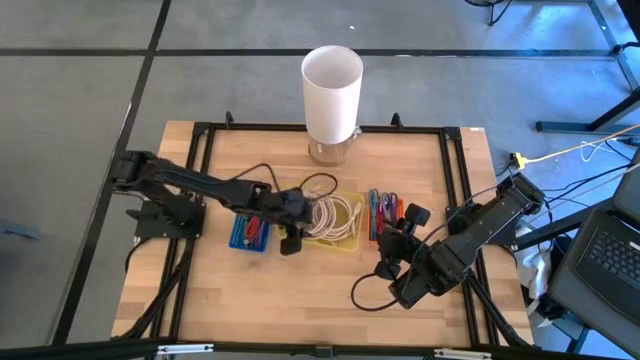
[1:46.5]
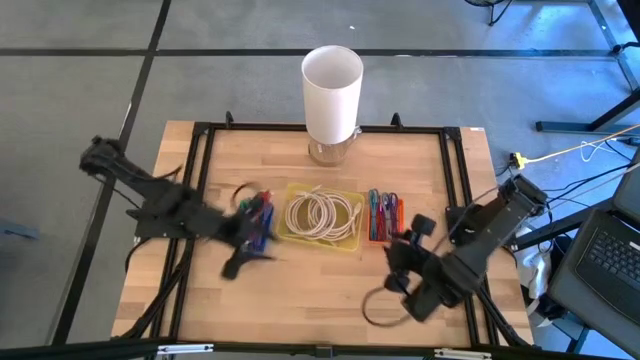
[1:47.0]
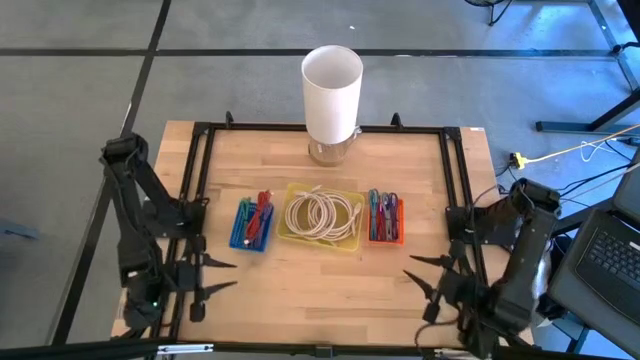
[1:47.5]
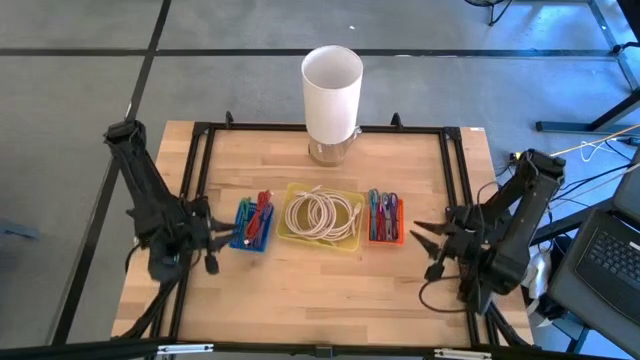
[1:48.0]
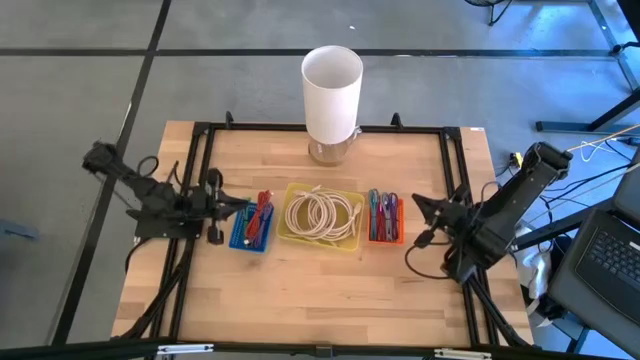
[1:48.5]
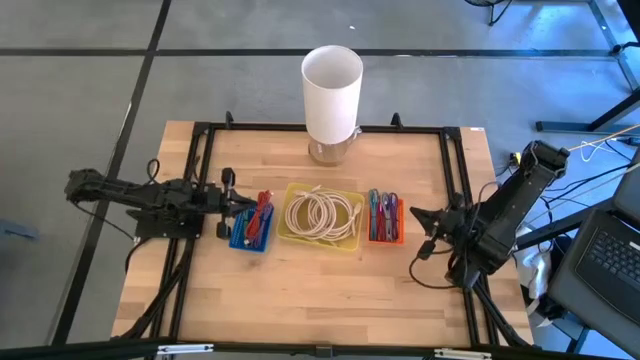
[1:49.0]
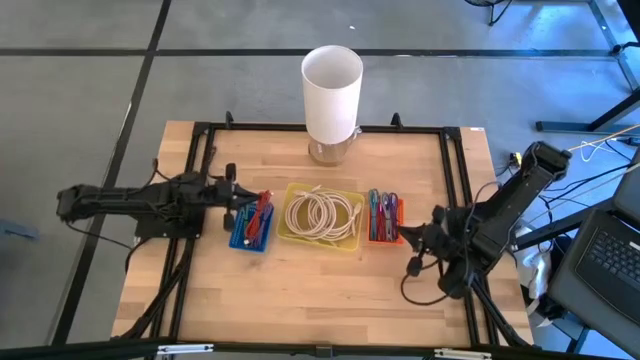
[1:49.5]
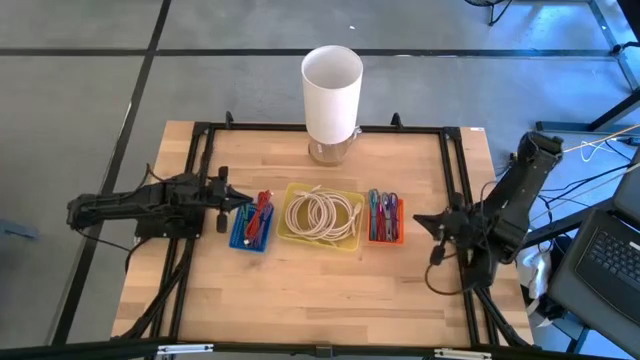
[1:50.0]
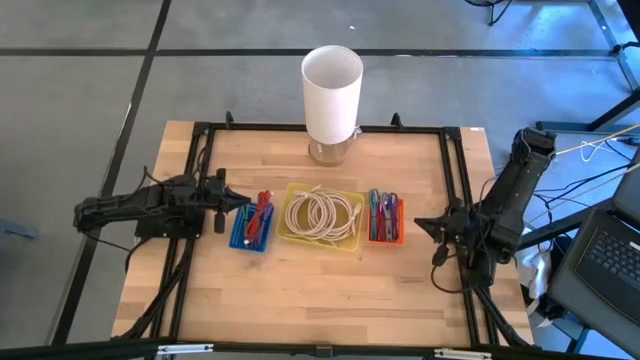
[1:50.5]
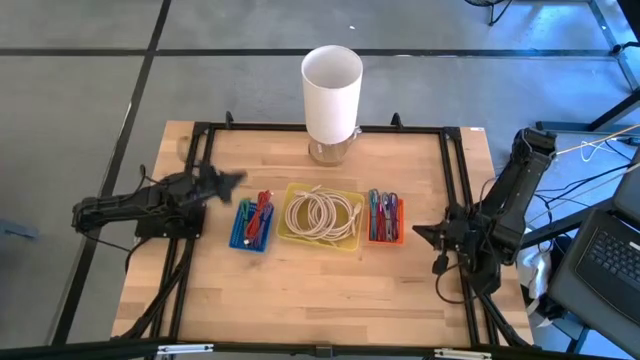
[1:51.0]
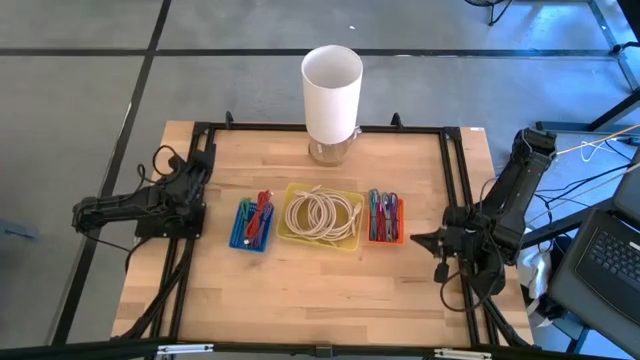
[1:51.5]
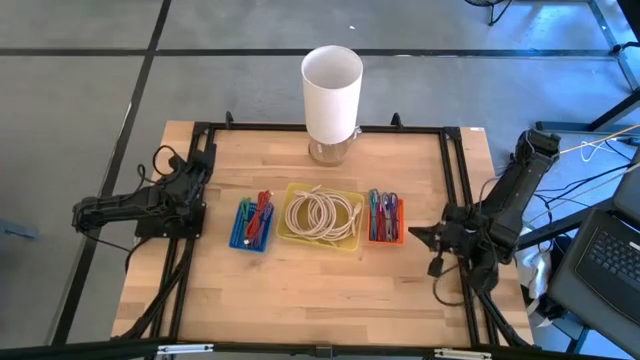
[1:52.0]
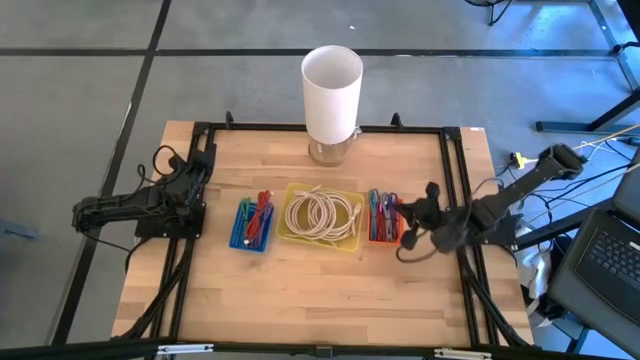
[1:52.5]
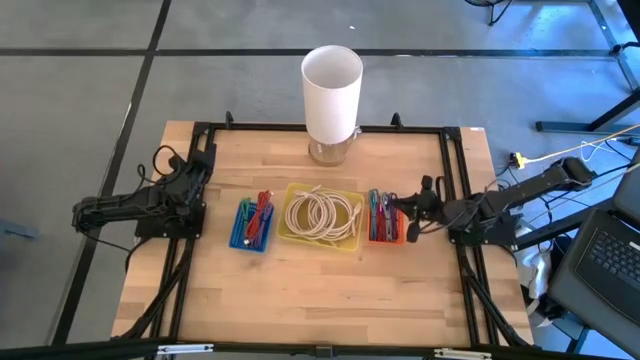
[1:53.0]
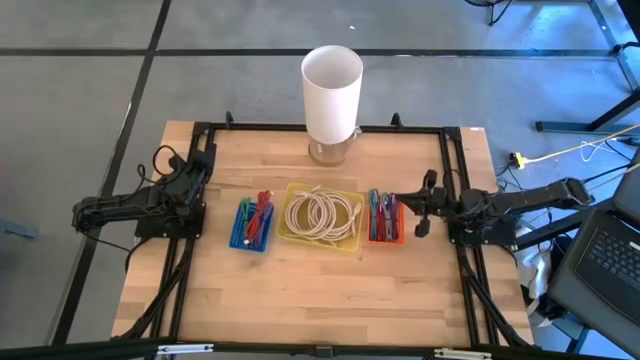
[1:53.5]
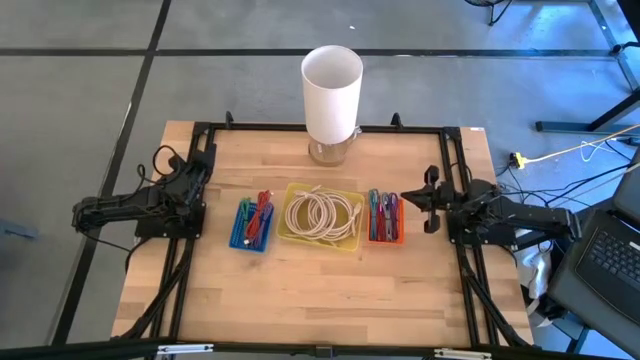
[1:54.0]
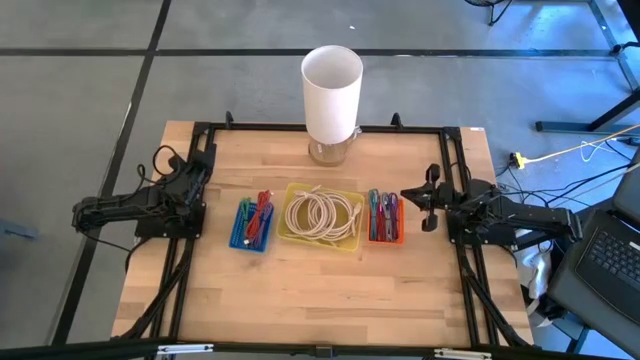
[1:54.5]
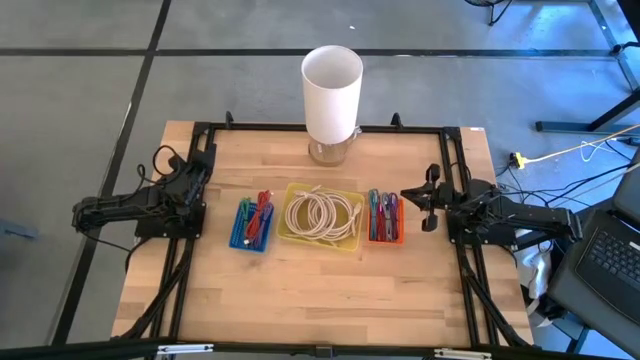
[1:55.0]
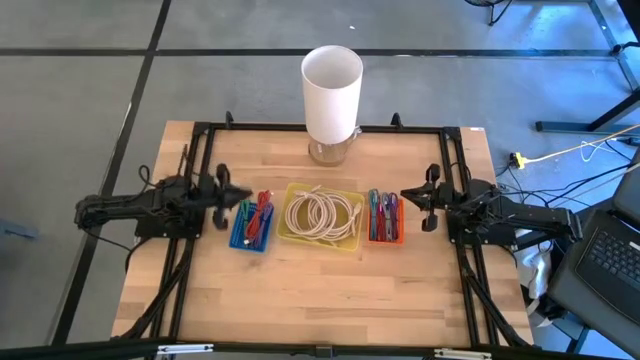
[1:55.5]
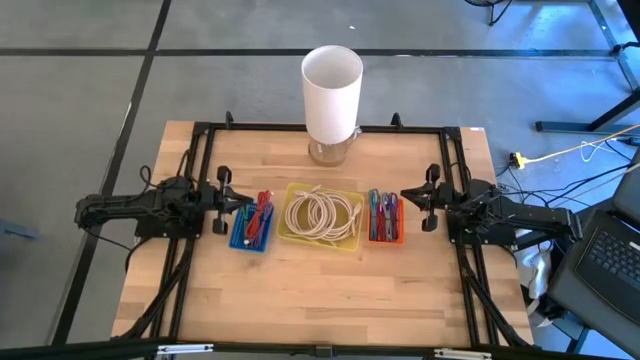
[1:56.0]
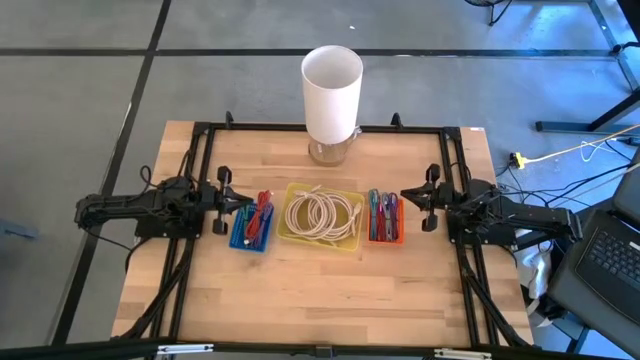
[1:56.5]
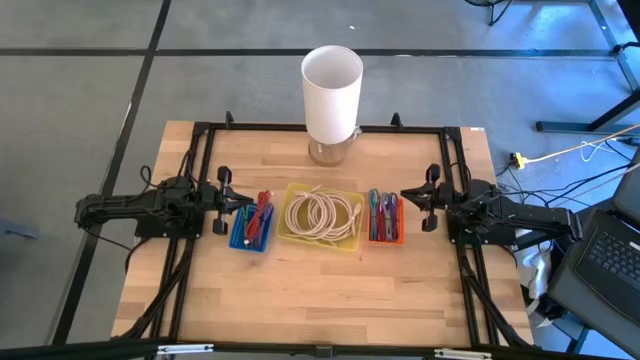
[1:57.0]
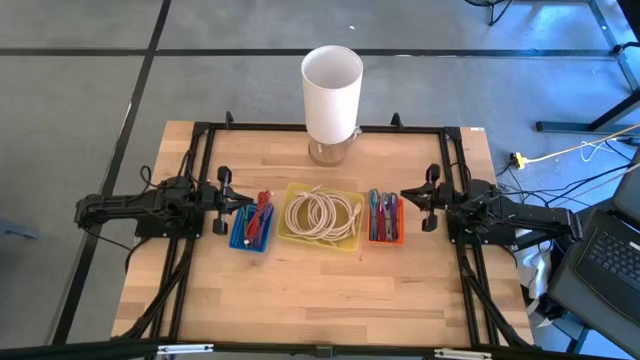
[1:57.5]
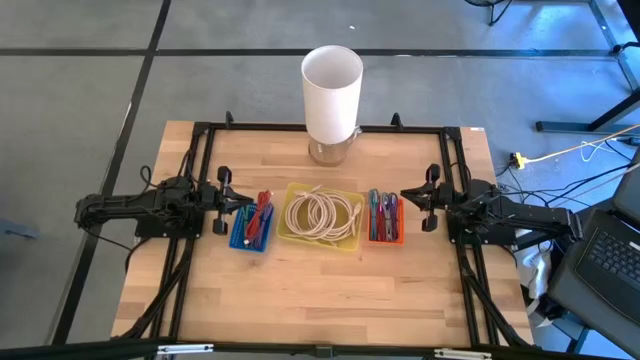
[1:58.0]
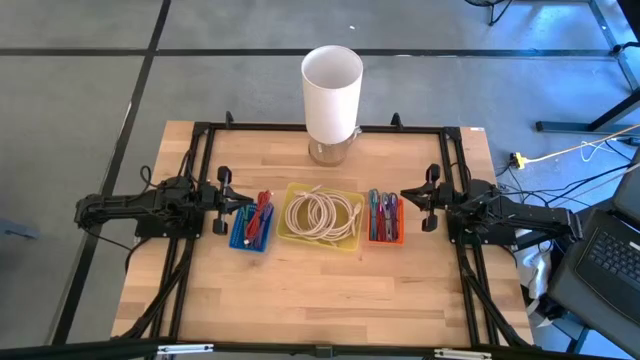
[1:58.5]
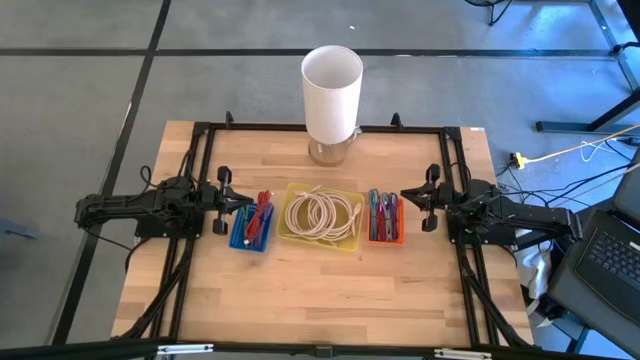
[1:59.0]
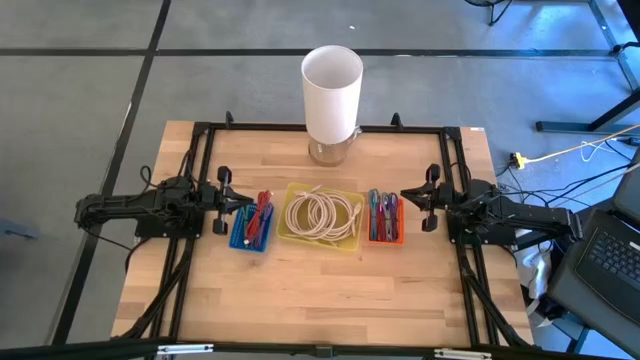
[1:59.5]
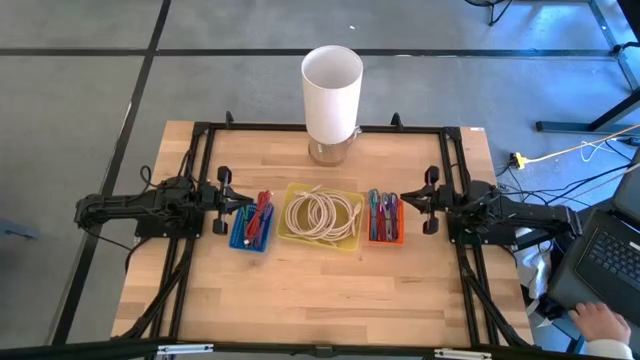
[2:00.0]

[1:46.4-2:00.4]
Task: Pick & Place USB Port
Return to Home Position

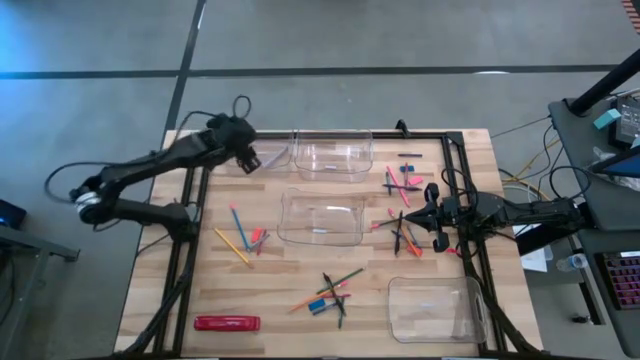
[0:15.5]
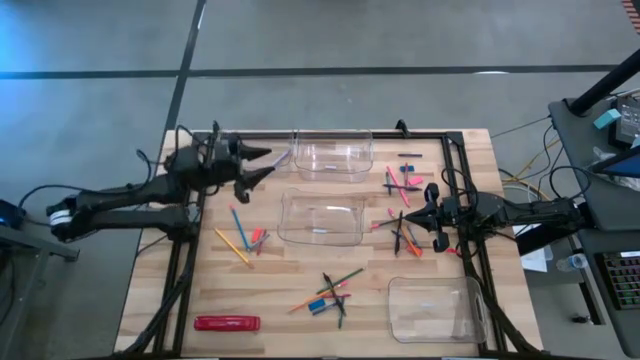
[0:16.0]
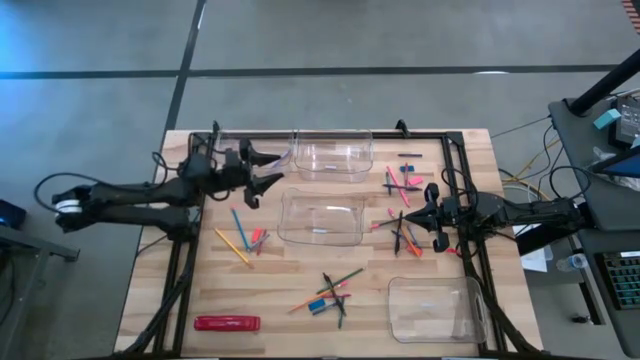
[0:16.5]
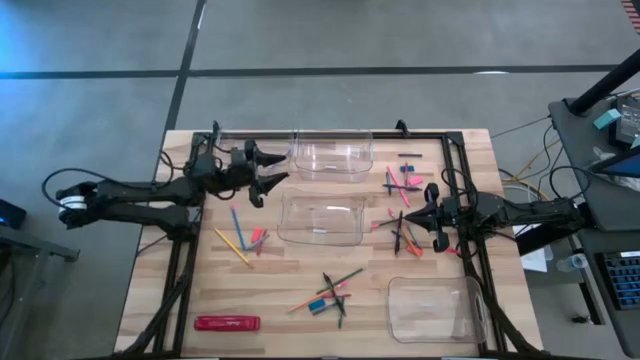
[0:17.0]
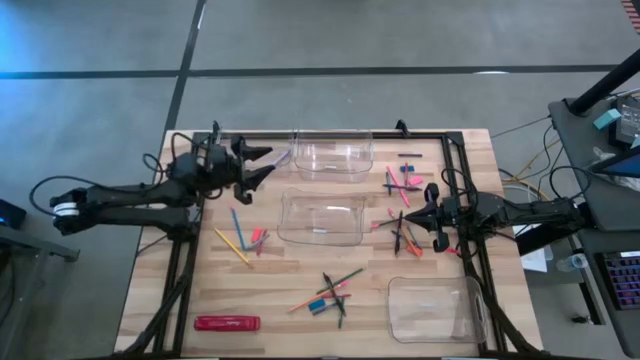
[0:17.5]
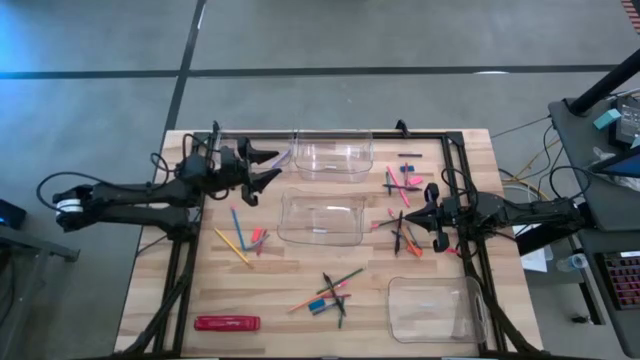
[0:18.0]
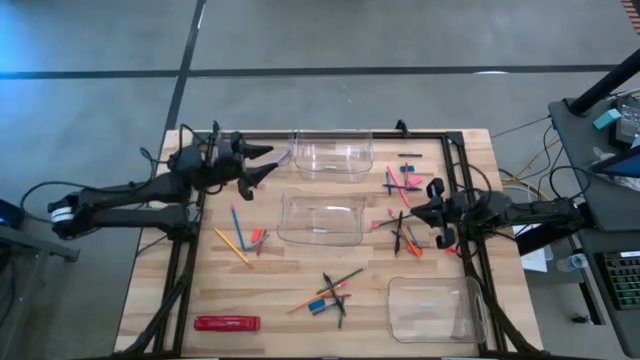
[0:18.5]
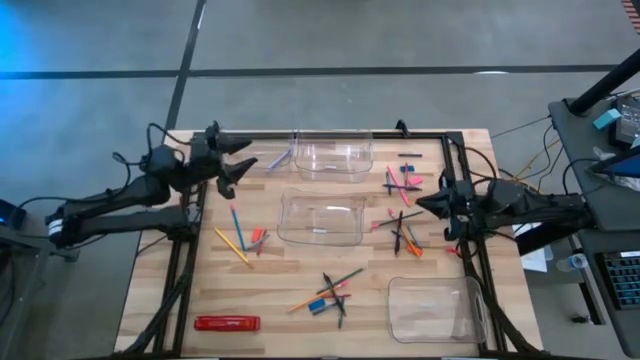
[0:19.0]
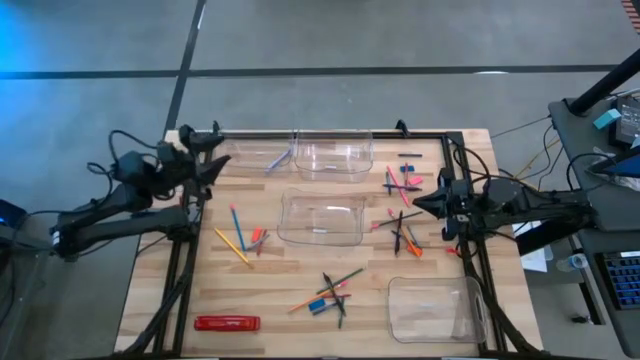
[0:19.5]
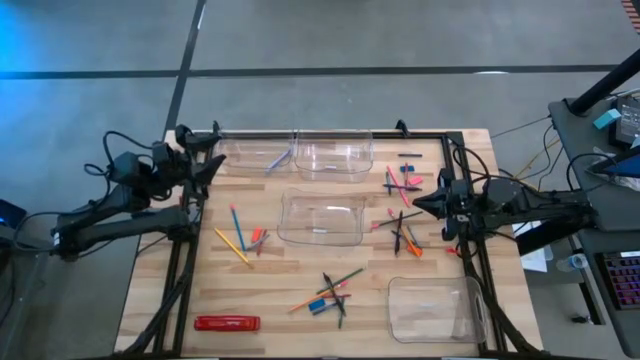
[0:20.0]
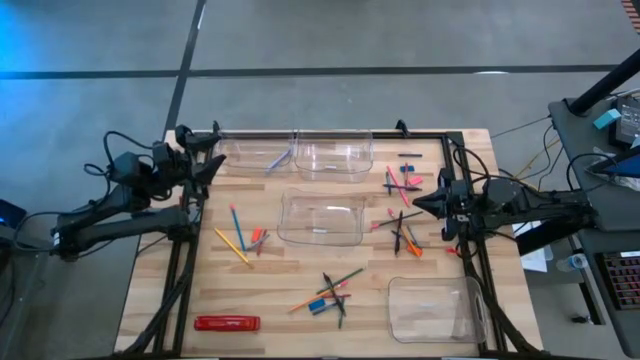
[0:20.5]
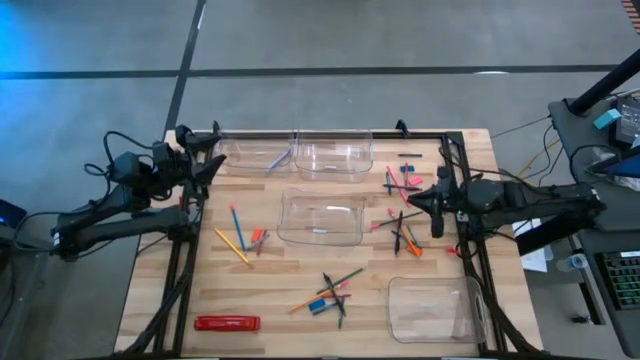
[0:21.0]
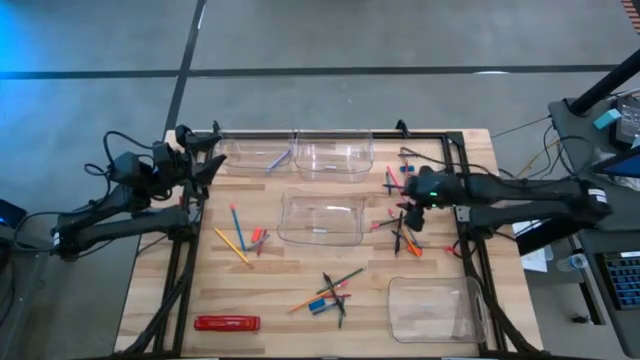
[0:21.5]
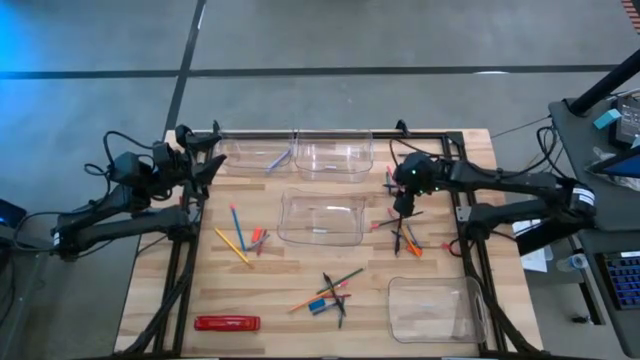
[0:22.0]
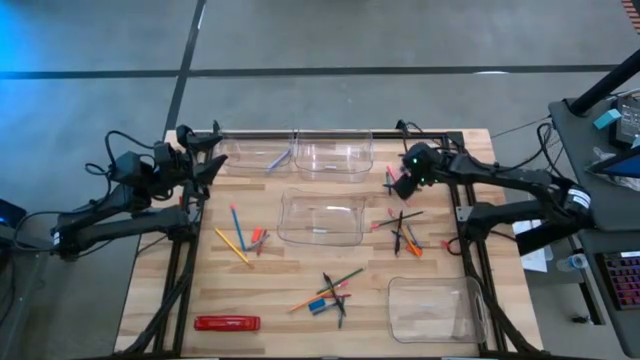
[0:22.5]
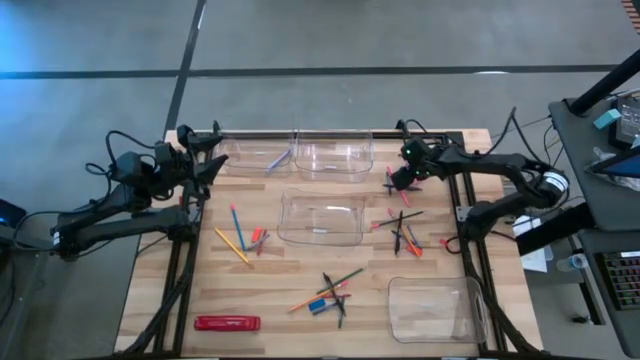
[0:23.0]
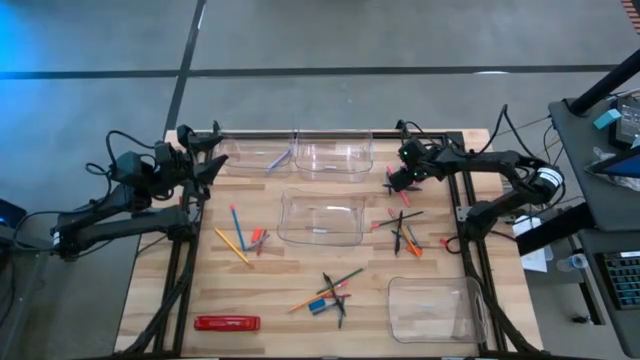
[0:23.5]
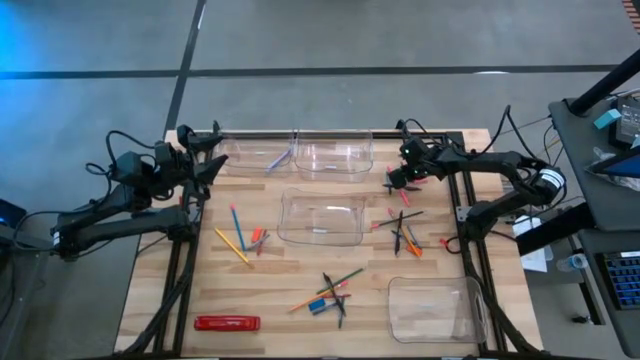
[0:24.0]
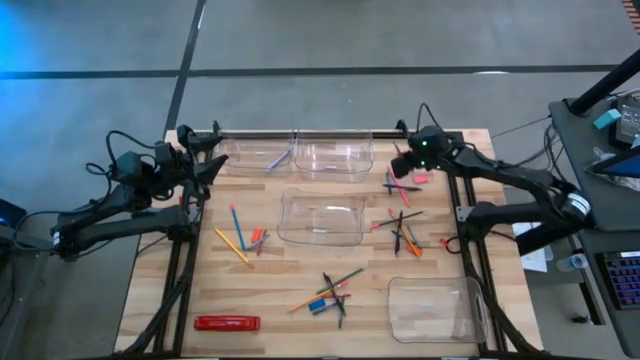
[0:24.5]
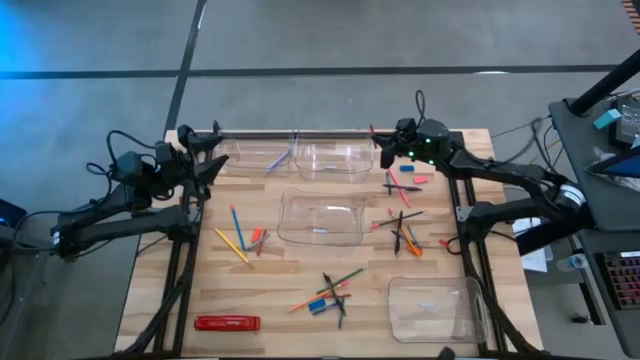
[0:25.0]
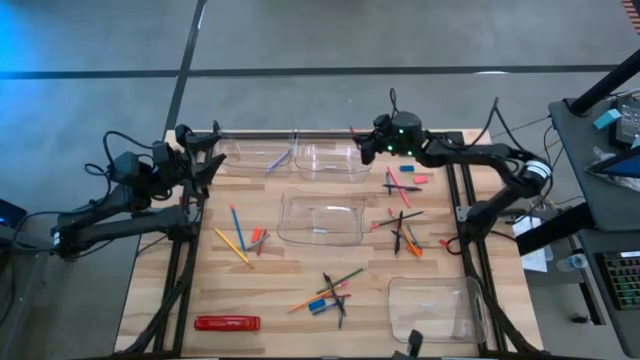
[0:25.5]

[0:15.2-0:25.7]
Task: Sort crayons/erasers/pens/pencils in bins
Put the red crayon into the top right transparent bin
